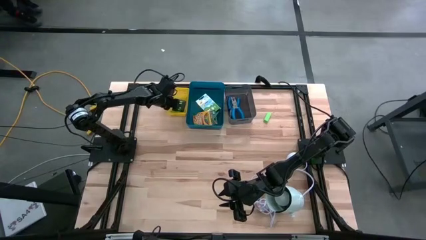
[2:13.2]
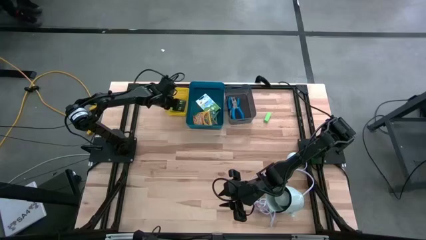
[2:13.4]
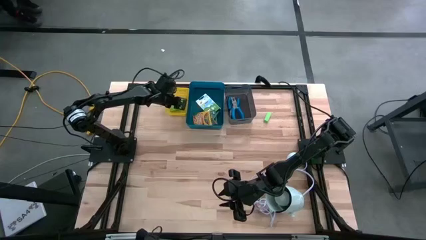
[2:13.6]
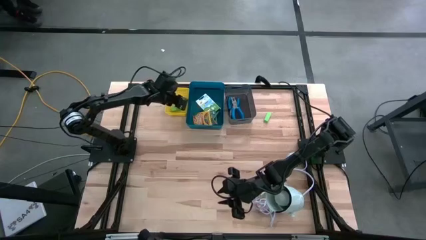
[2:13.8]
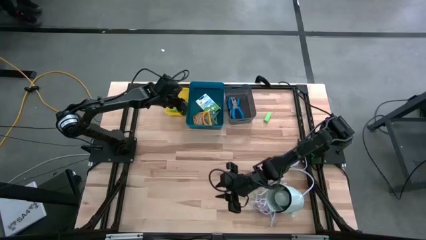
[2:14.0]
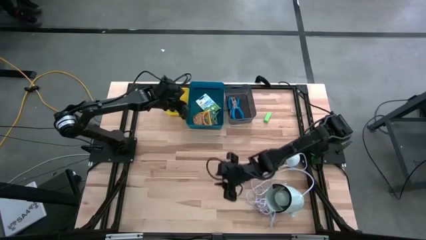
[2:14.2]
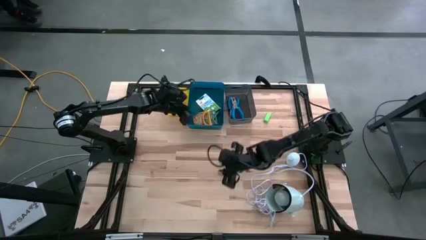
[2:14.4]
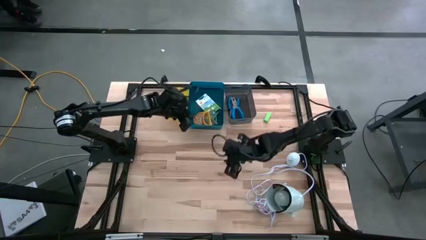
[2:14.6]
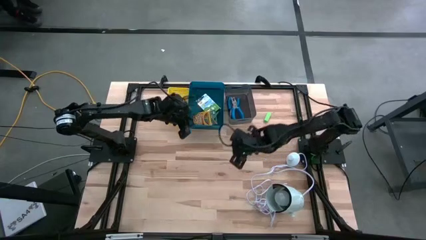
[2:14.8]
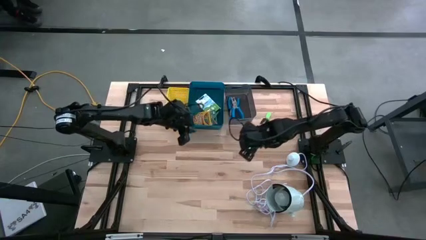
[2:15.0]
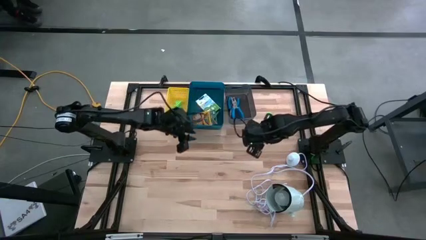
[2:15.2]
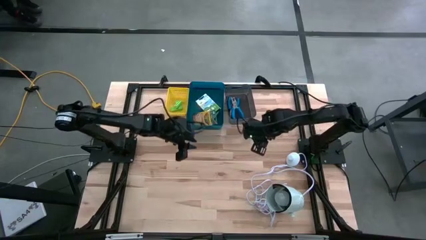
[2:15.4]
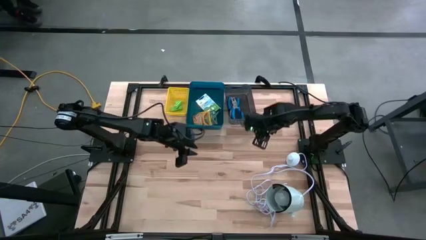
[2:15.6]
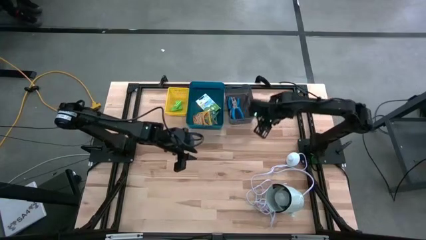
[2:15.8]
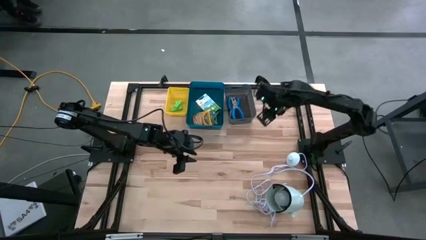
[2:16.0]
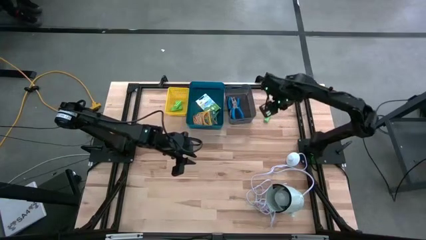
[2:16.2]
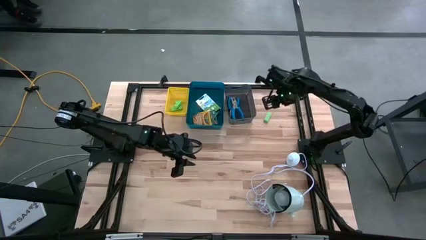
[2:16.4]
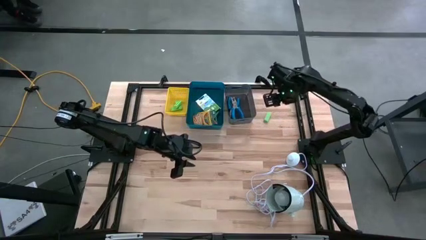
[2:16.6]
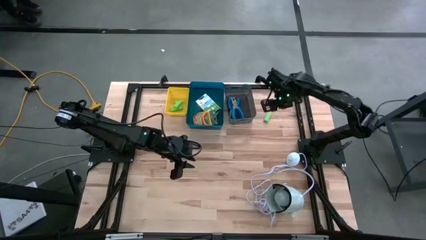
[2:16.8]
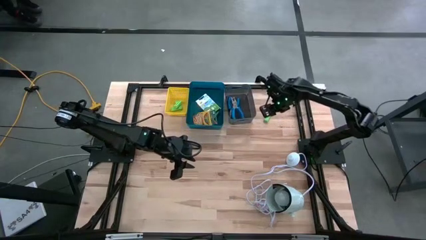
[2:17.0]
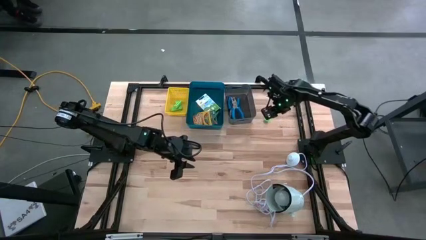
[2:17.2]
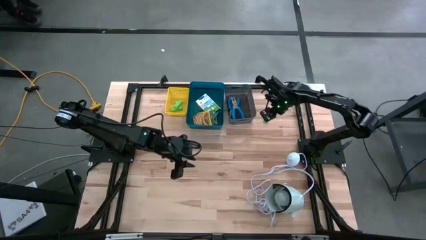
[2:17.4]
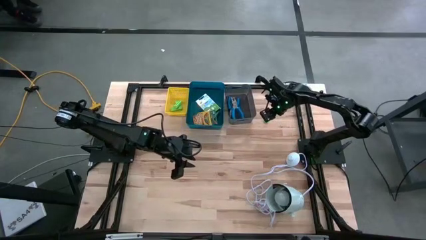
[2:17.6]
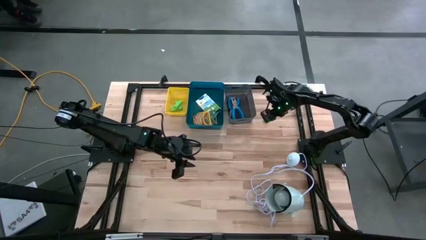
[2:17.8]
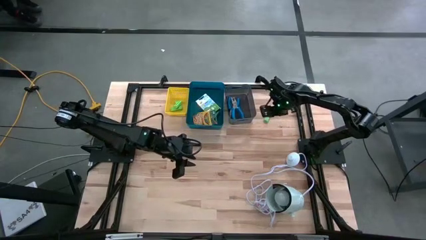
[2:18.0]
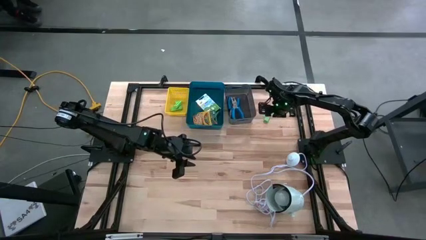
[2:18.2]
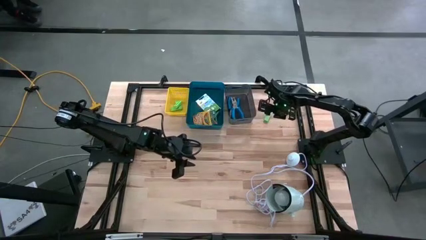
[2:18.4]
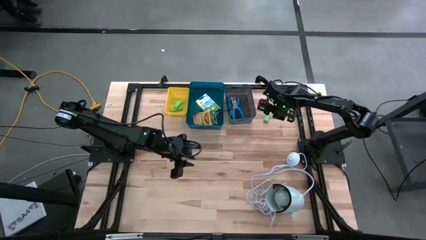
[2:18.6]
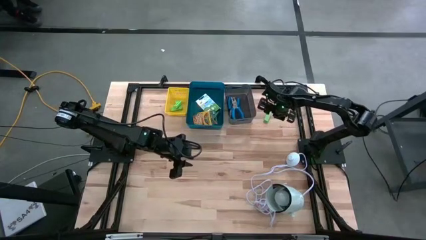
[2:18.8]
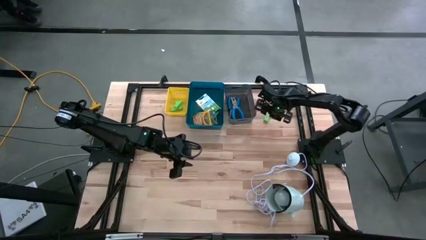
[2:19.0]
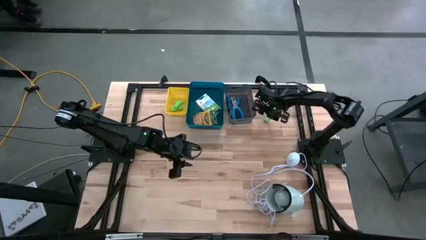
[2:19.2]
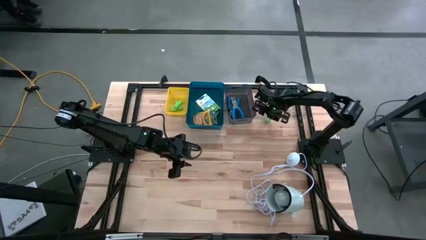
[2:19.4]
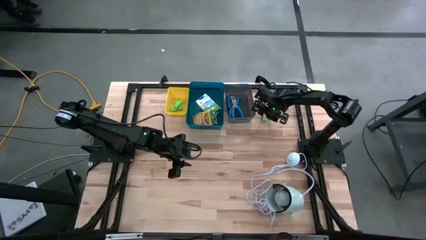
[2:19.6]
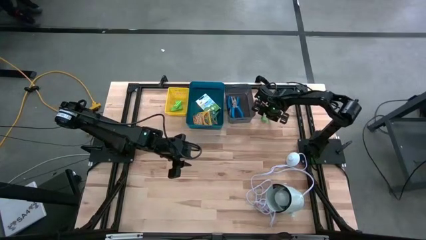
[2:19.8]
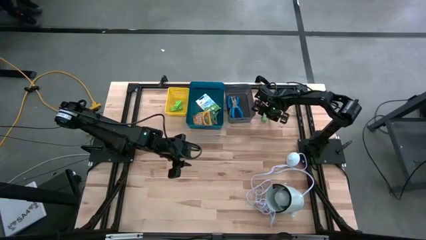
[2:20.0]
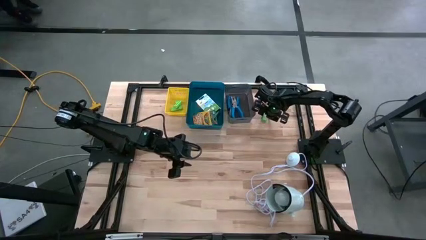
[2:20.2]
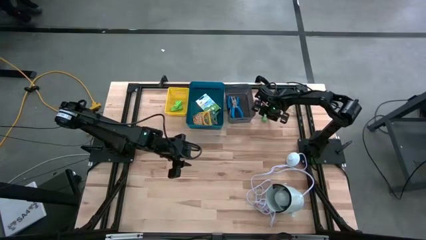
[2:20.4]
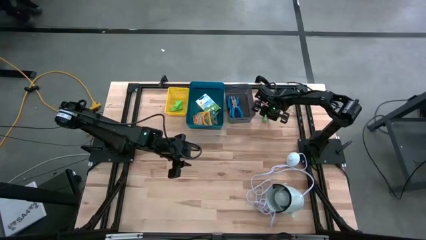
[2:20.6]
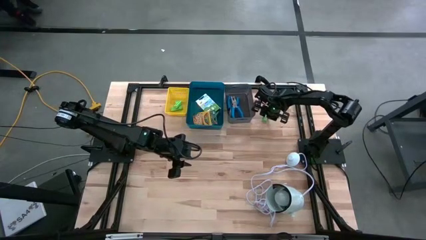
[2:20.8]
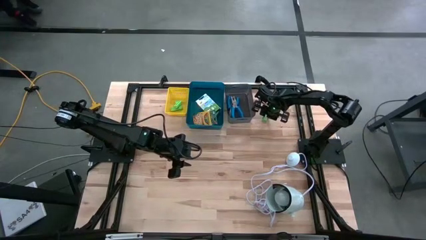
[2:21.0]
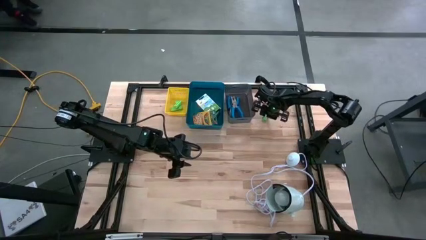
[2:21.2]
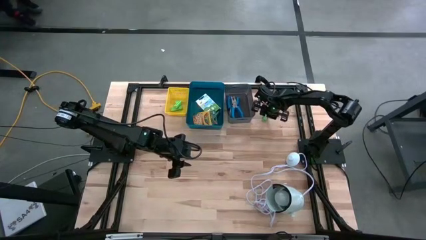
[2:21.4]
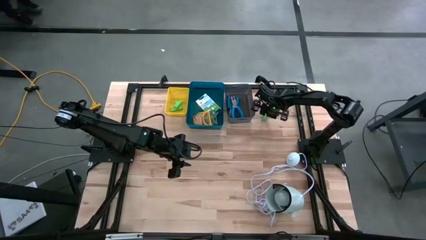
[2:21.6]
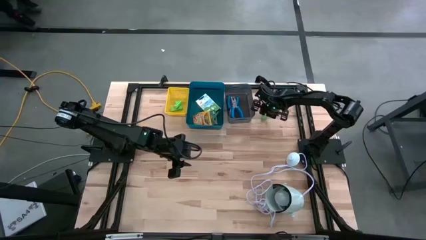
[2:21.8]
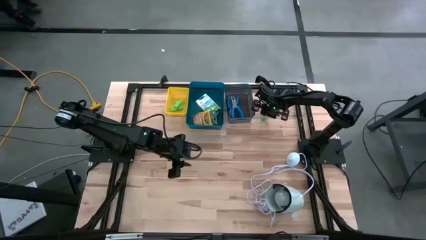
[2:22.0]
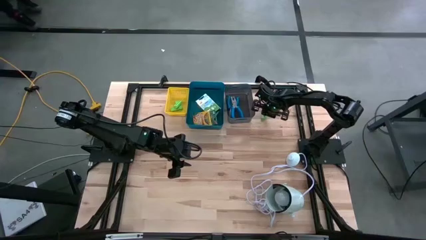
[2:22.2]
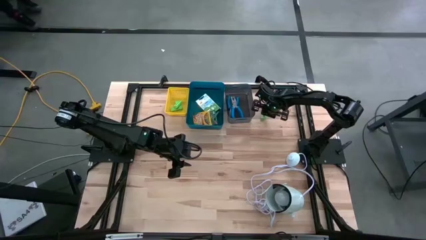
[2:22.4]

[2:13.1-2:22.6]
Task: Pick & Place School Supplies
Put the green eraser into the yellow bin

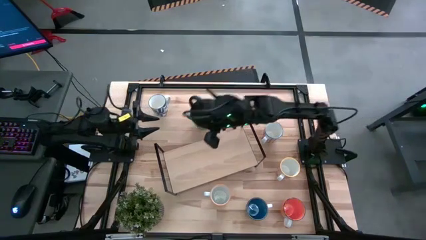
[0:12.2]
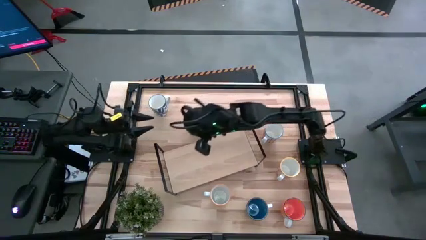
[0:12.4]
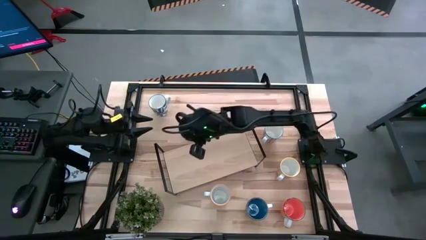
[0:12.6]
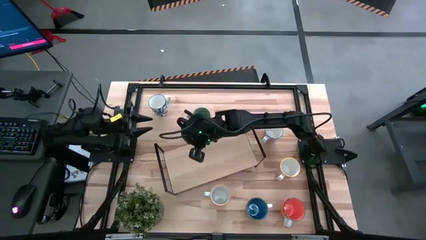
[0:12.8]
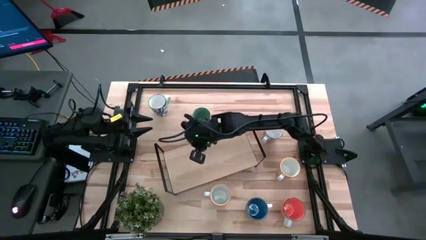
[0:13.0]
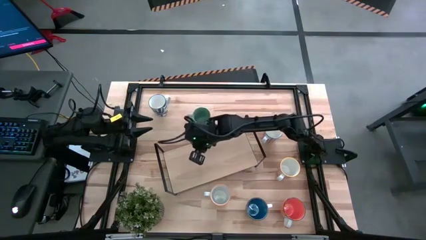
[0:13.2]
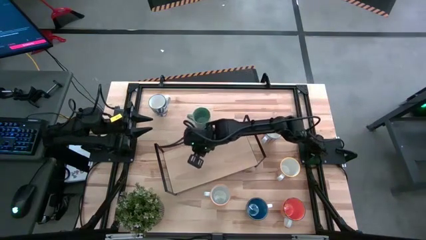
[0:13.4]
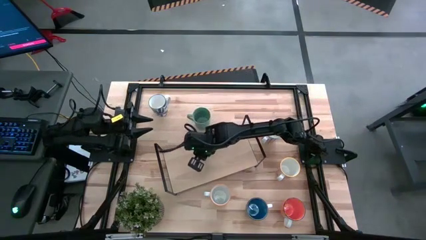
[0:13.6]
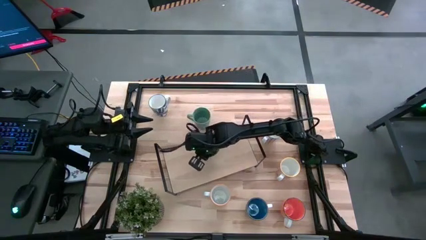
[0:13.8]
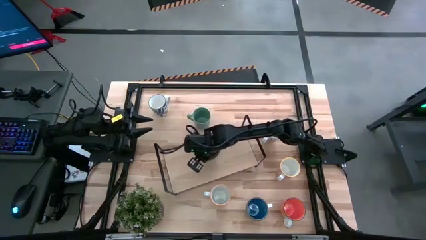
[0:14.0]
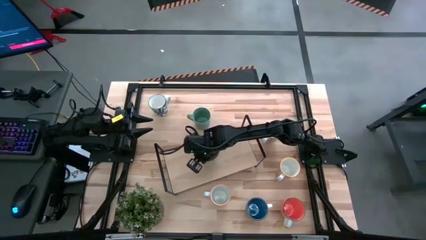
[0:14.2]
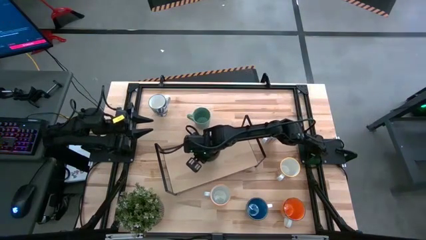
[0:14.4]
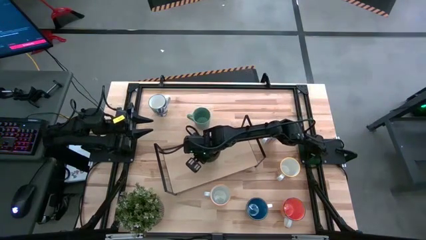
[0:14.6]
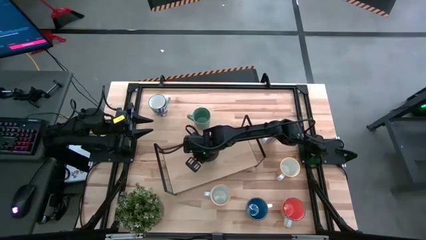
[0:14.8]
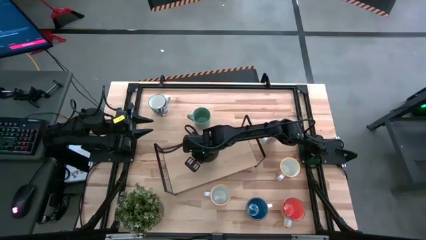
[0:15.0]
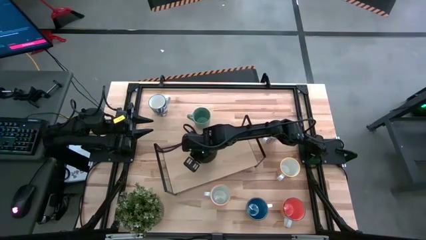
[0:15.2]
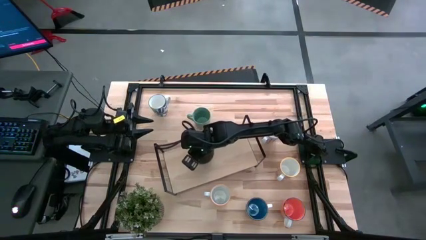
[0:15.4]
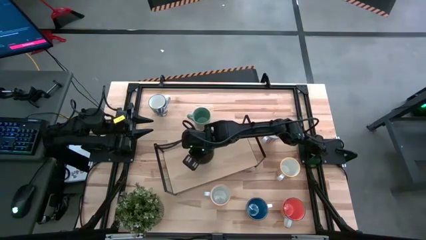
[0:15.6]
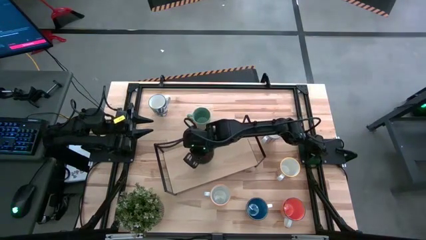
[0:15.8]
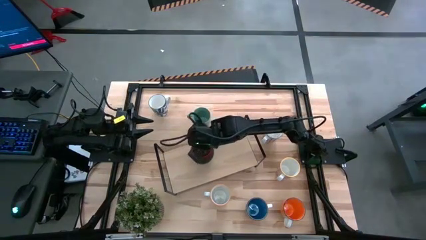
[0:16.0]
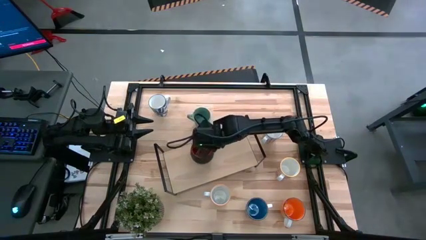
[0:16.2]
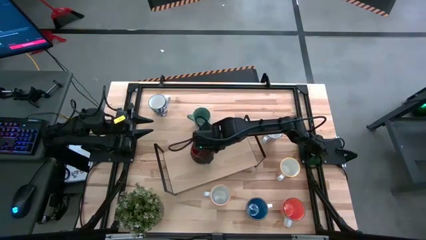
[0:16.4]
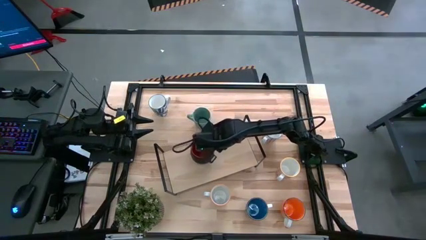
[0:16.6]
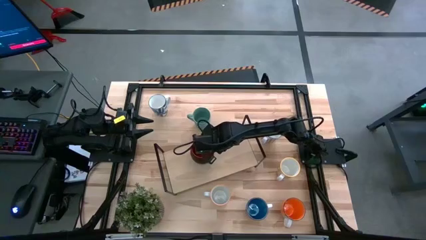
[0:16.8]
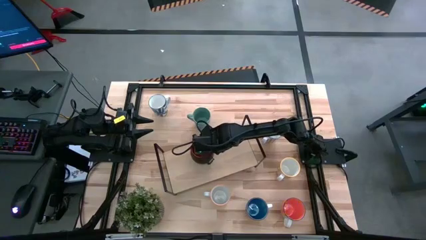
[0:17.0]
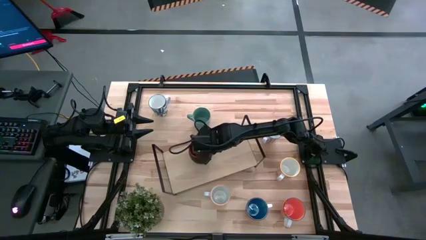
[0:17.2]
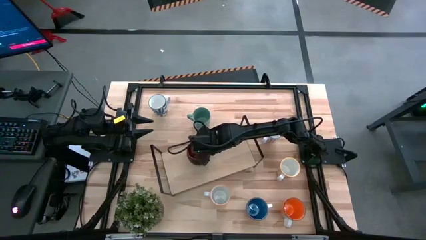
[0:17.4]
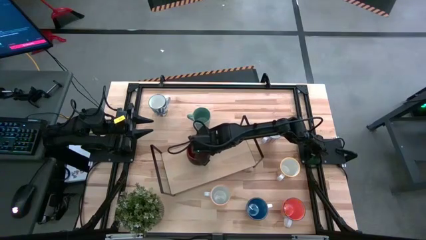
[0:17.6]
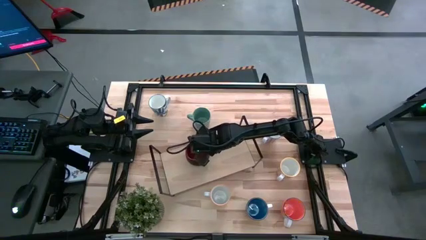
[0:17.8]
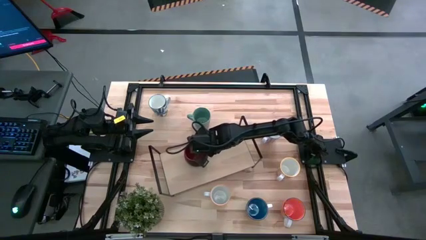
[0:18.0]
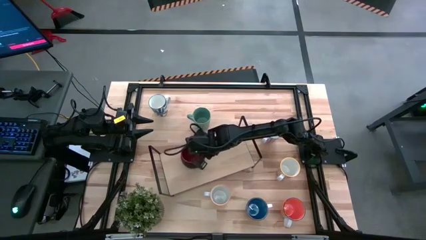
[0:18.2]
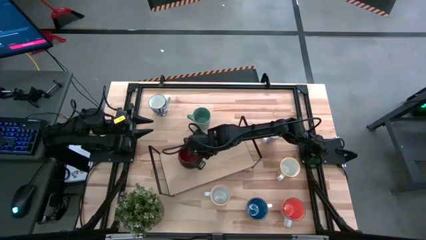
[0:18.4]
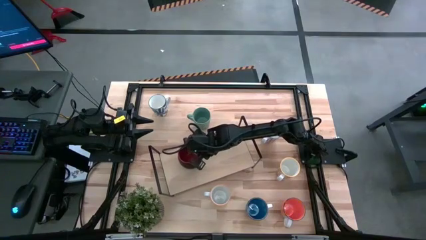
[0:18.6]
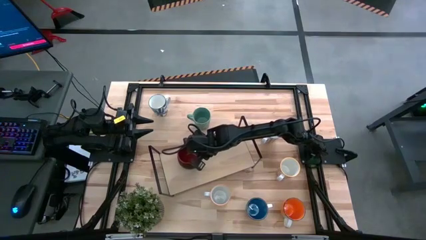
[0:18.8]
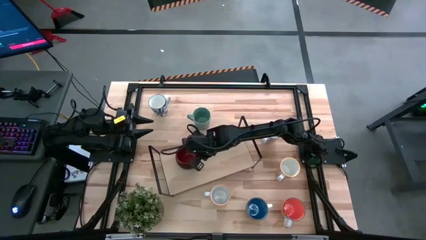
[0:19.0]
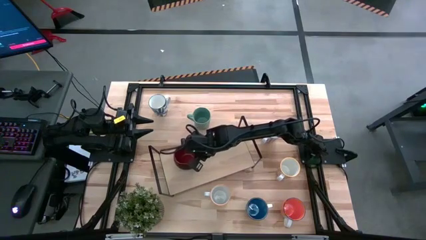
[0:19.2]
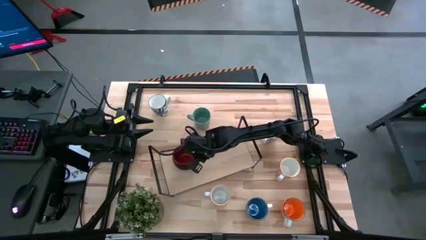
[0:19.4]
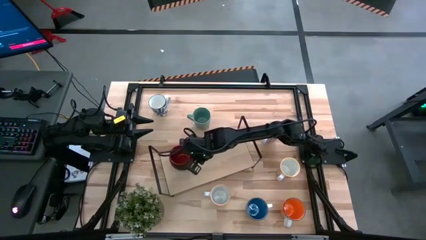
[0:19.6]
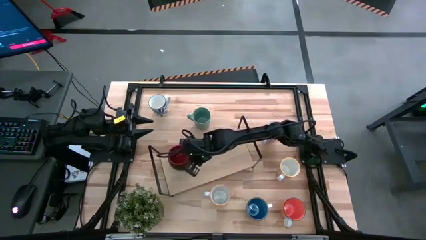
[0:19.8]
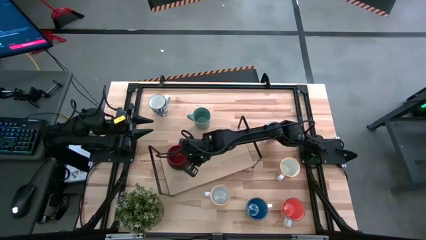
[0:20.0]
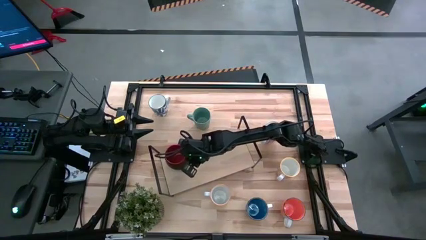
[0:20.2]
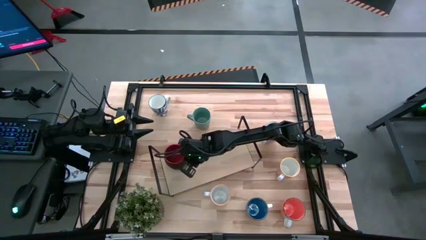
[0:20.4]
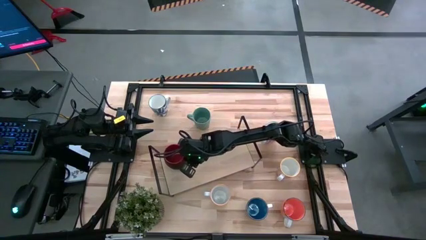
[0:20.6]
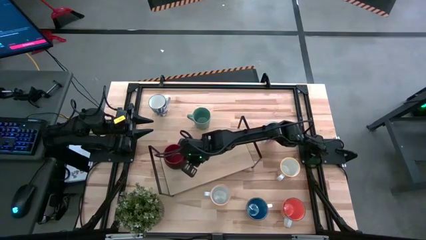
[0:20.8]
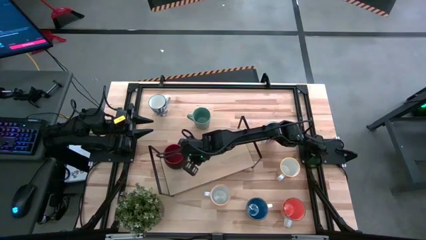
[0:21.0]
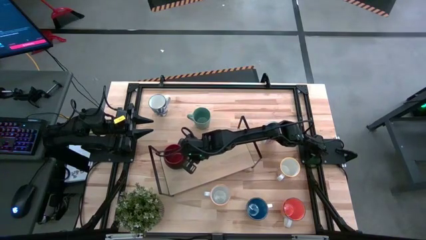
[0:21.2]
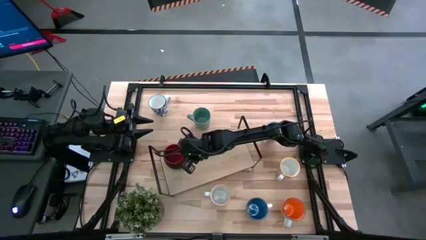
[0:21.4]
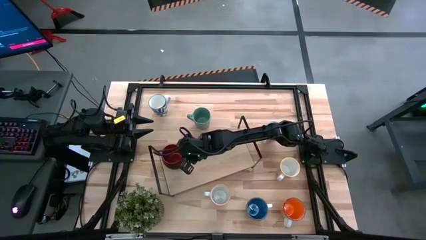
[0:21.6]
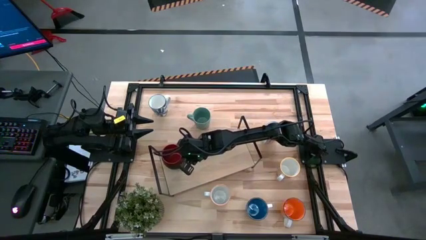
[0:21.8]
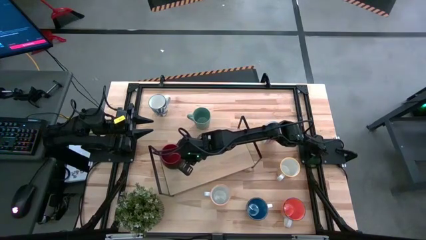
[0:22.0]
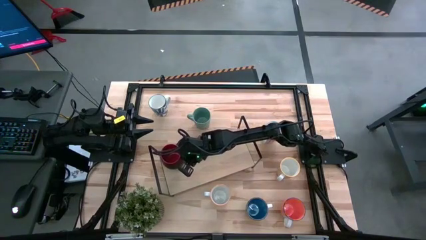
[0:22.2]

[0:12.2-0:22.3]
Task: Place coffee mugs
Put the black mug on the shelf
